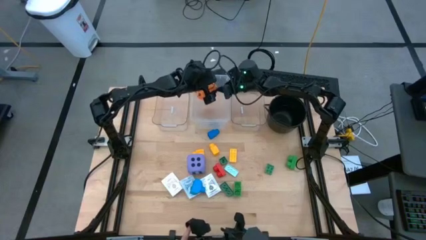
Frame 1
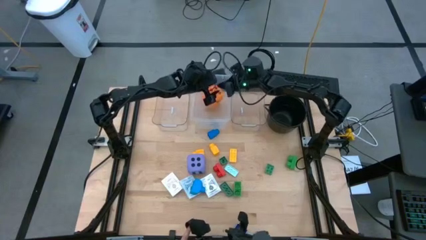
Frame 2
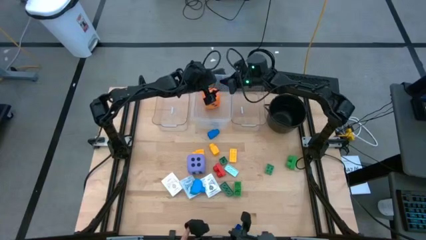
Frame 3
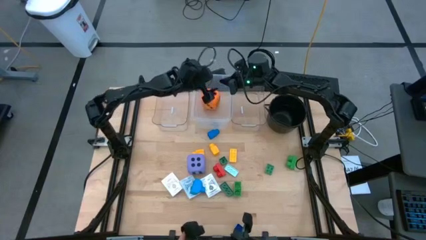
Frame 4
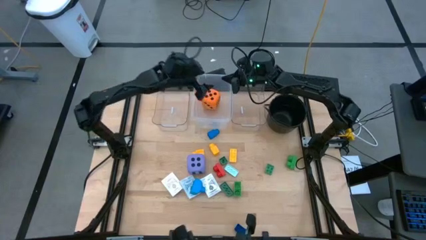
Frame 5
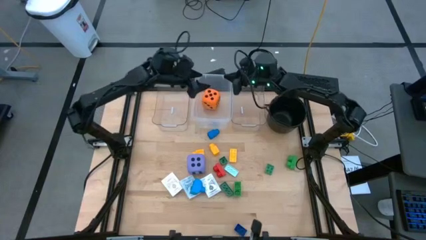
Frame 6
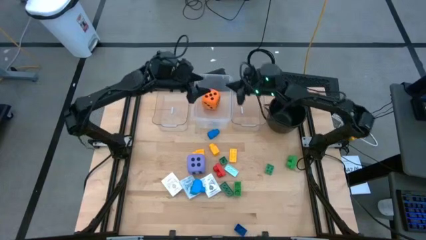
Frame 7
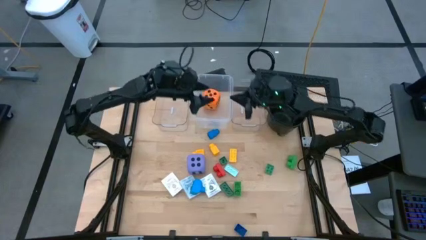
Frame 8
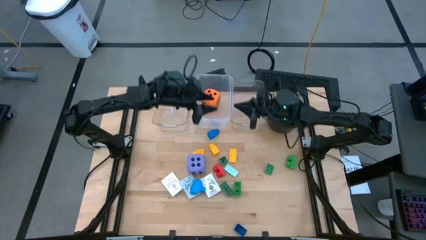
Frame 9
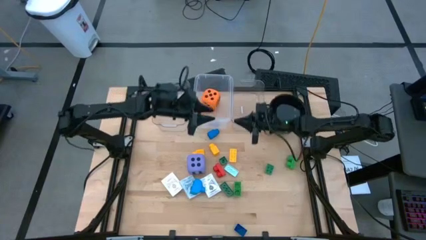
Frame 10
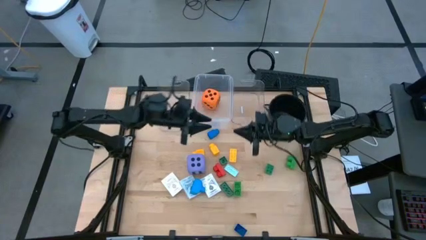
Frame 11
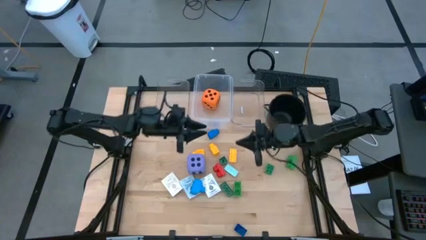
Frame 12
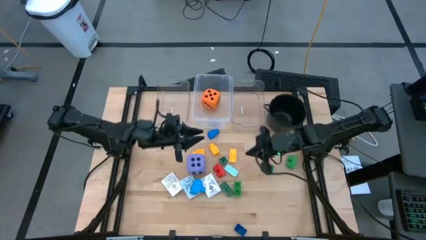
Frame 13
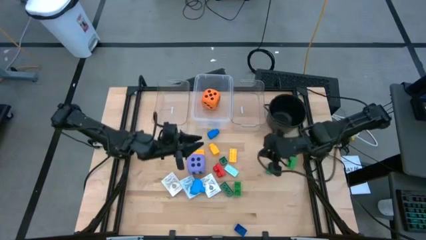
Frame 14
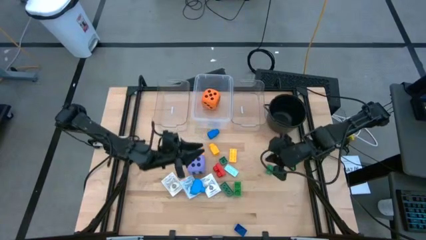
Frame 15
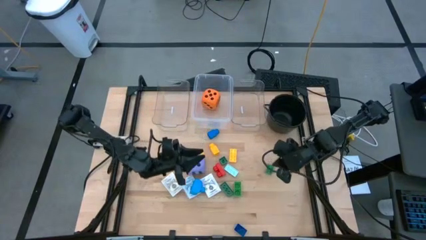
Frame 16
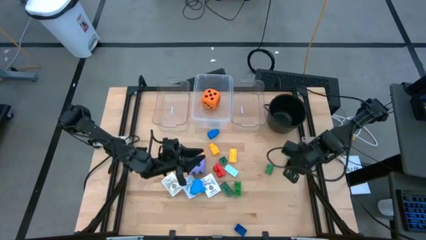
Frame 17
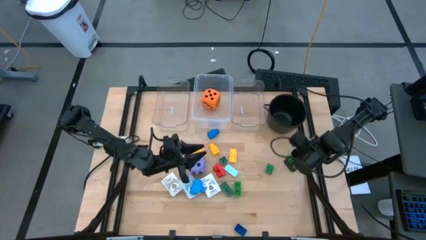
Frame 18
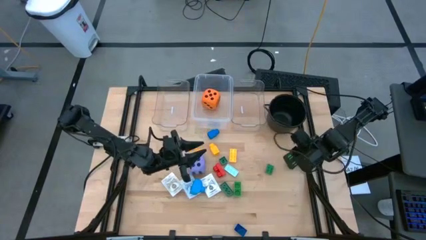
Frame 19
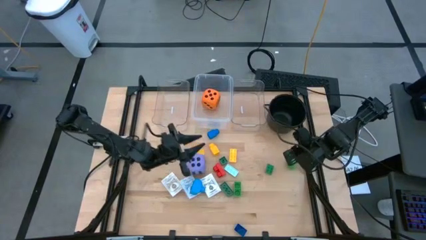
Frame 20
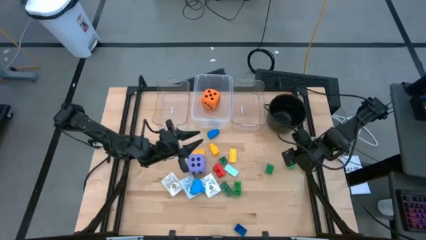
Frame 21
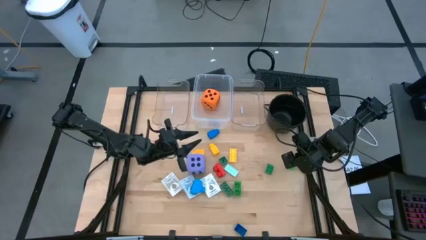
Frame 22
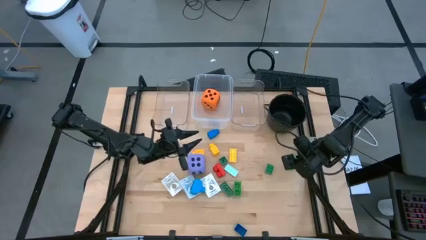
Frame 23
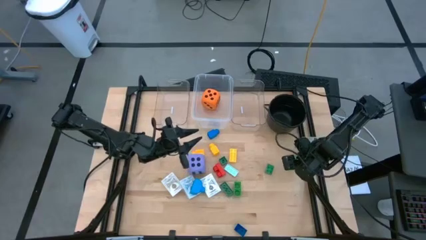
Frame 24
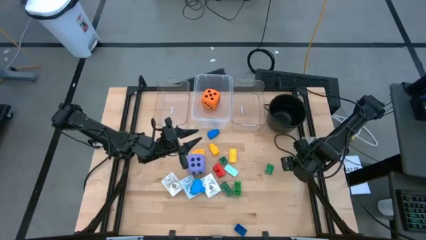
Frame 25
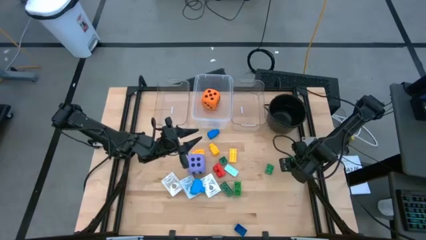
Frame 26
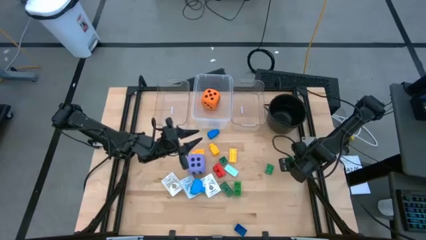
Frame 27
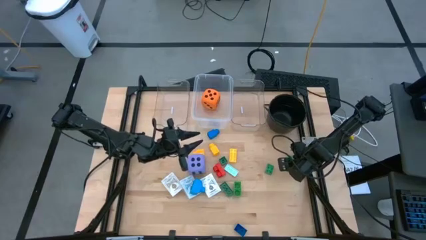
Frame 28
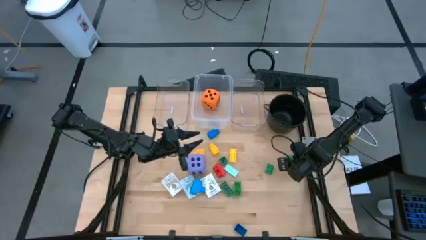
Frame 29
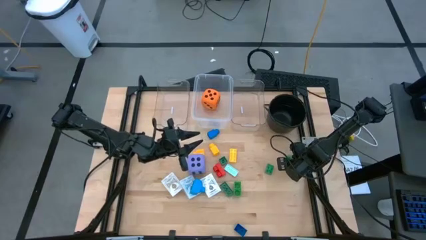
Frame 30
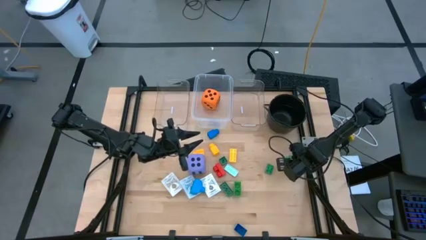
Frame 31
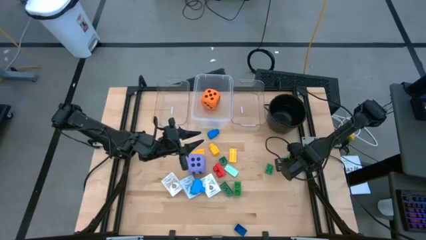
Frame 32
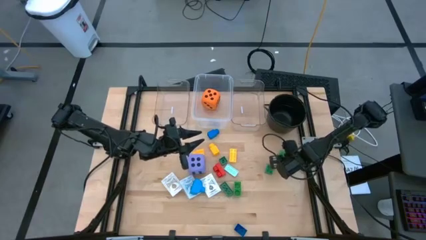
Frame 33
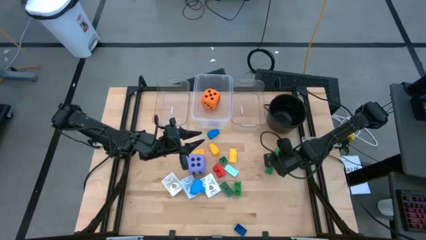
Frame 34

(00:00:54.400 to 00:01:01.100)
Task: Pick & Place Toys
Put the top light green game piece into the right transparent bin
